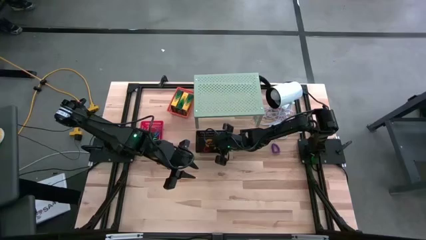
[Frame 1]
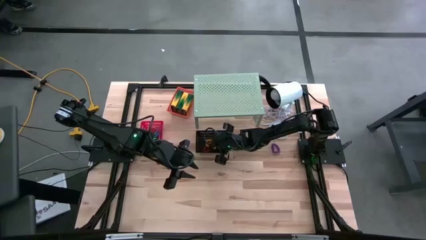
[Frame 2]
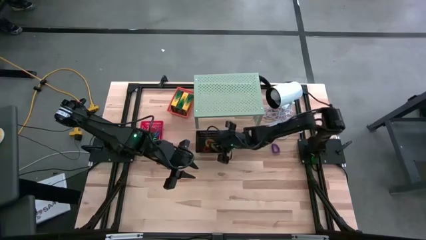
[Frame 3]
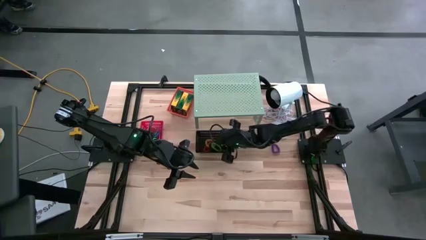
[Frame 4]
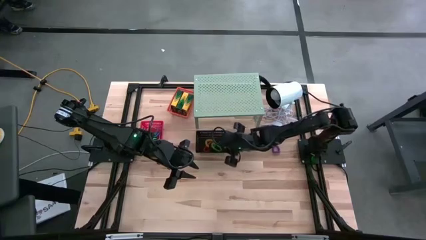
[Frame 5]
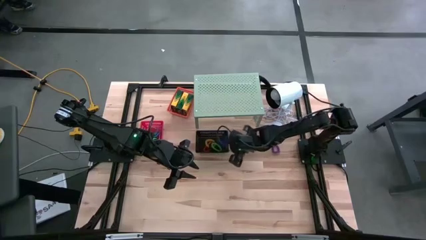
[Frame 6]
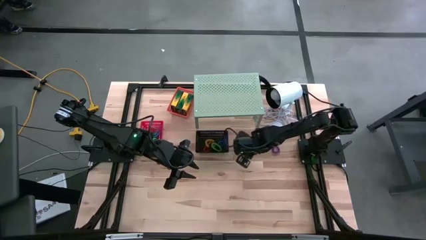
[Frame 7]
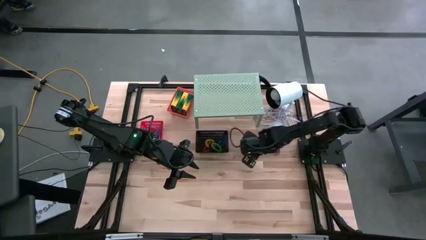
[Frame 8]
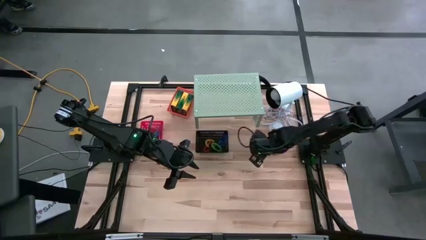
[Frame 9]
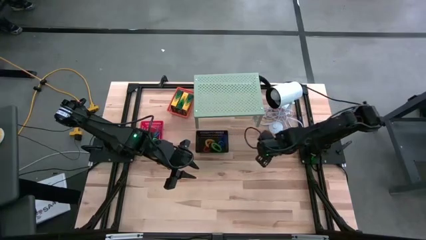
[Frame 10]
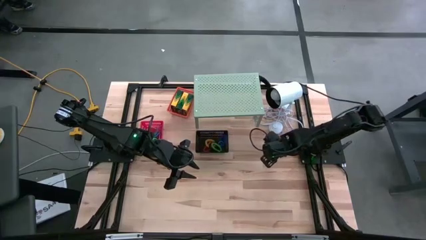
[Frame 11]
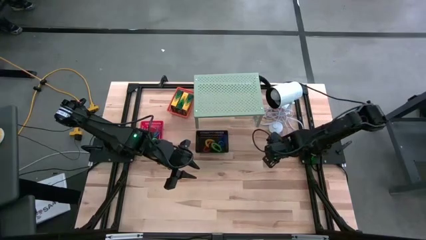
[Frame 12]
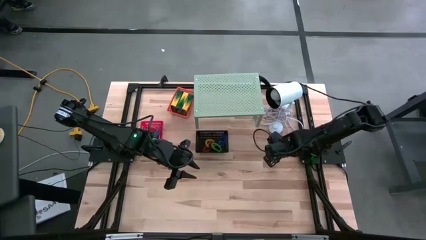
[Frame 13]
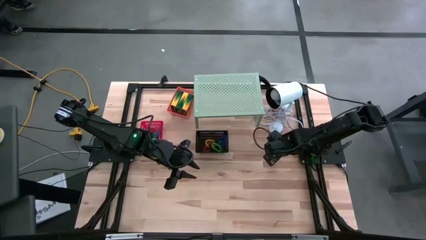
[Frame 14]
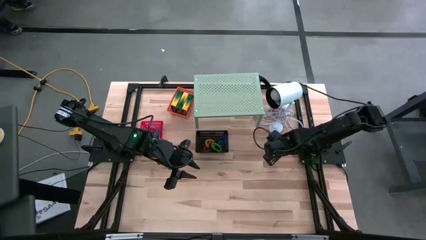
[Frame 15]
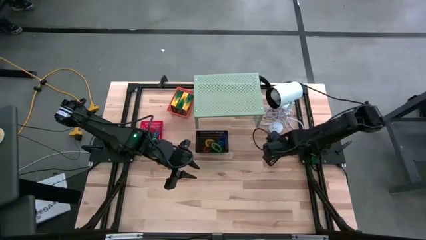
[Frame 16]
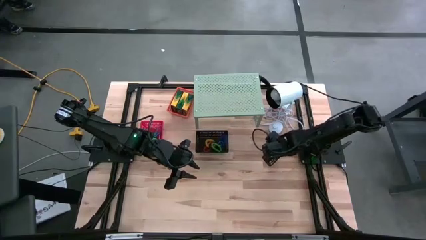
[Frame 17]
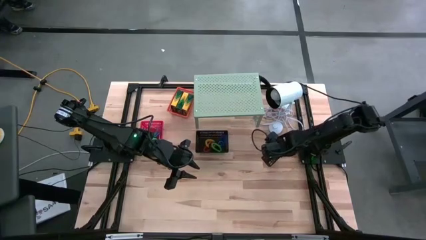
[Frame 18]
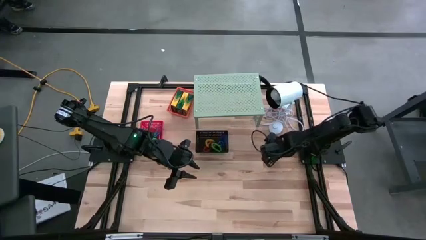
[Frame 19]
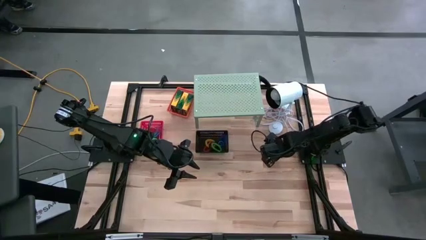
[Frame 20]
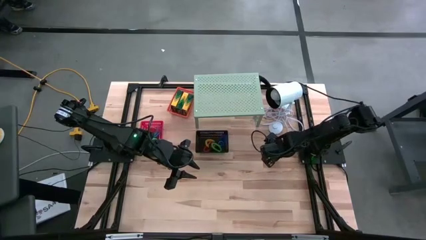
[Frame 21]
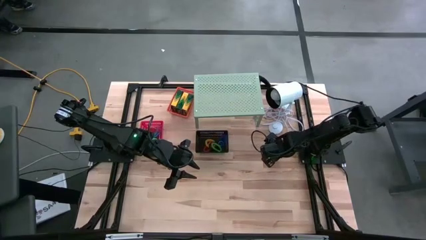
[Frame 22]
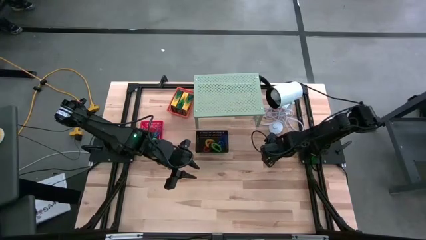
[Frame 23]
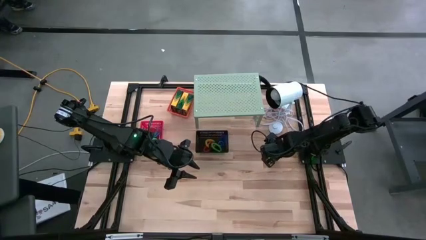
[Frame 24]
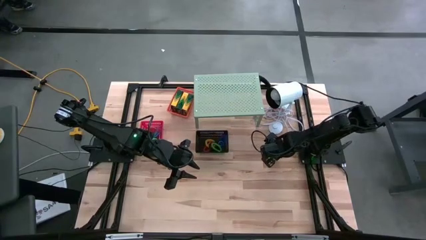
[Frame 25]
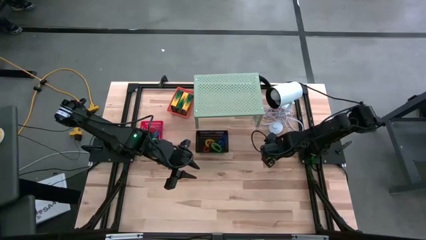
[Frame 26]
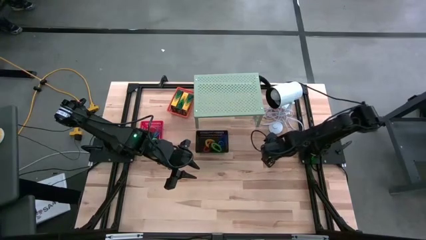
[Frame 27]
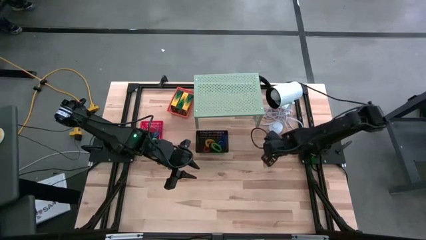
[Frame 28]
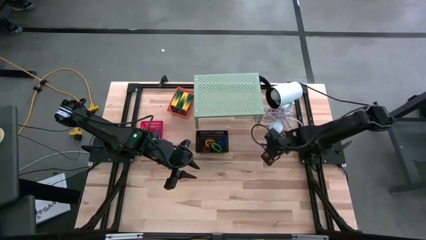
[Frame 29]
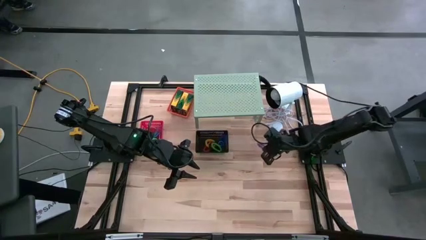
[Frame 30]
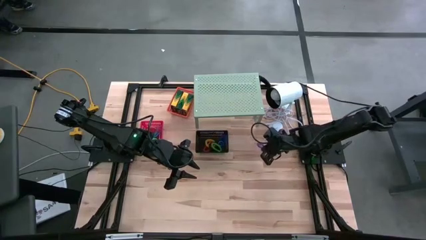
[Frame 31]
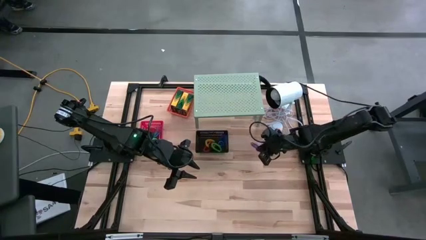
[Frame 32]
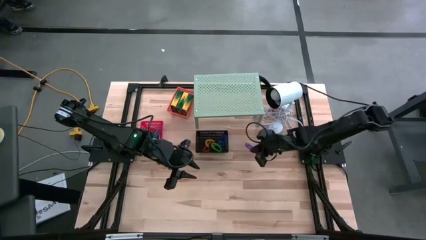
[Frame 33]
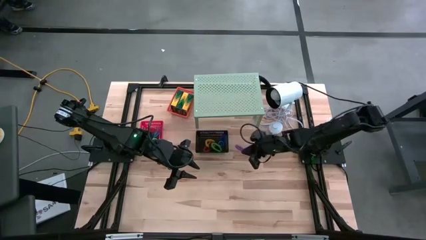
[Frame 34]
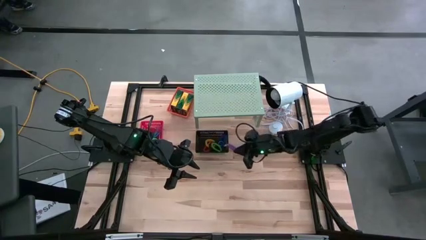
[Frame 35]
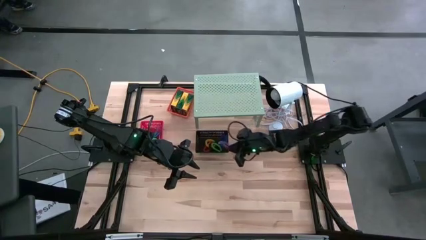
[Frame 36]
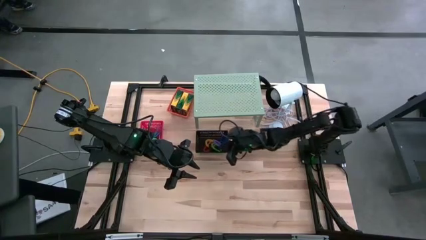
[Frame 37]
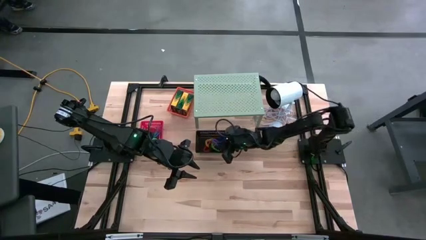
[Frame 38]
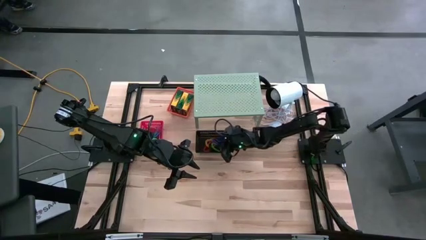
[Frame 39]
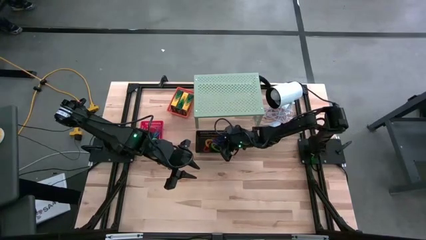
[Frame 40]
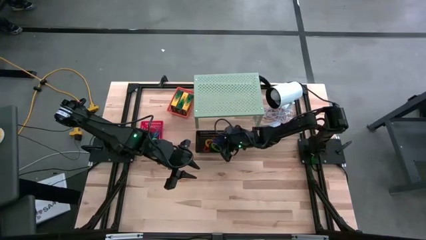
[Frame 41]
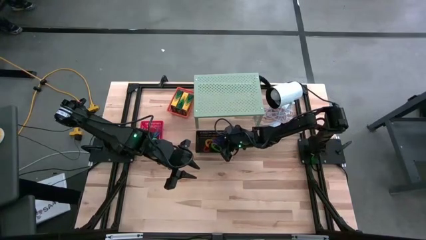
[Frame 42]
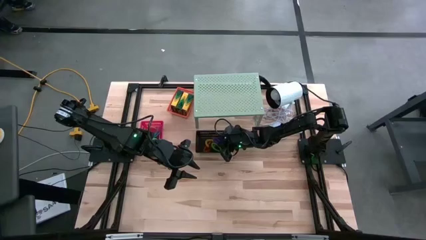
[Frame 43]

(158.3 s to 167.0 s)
Task: Pick & Place Office Desk Supplies
Put the violet spring rubber band into the black bin on the shelf

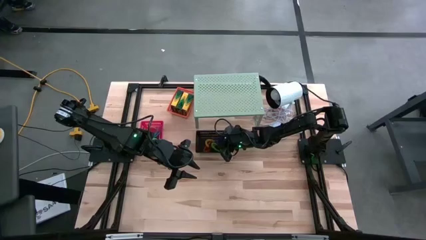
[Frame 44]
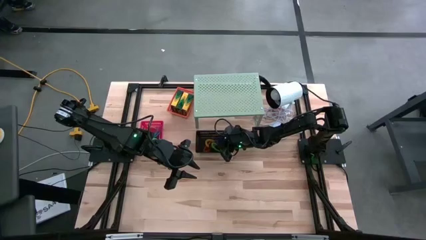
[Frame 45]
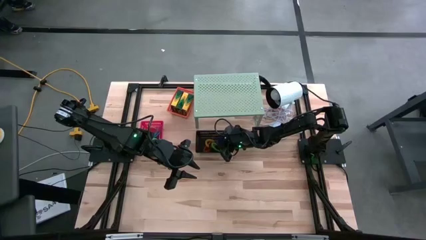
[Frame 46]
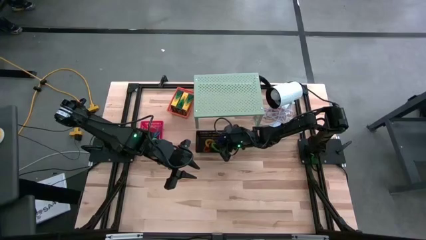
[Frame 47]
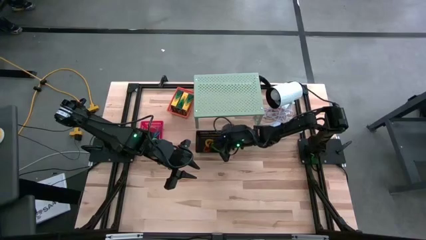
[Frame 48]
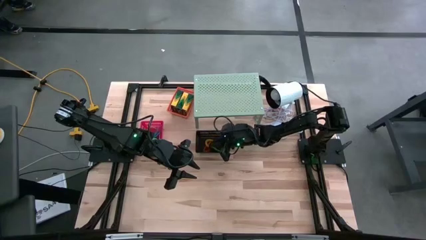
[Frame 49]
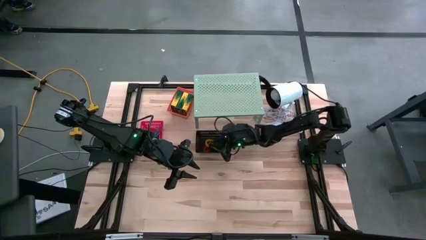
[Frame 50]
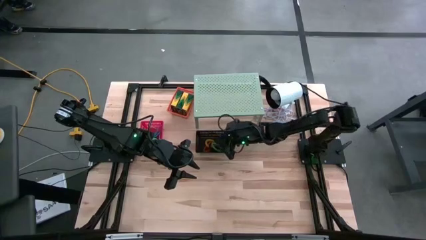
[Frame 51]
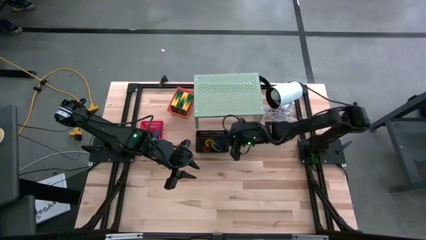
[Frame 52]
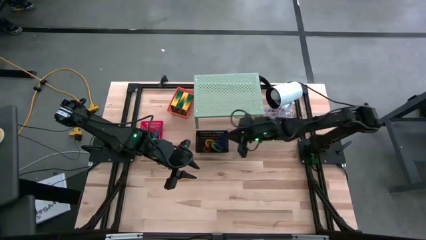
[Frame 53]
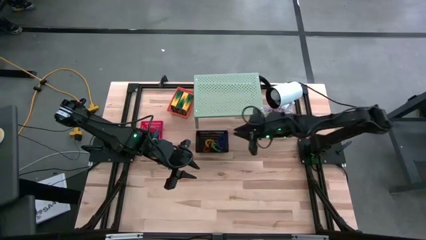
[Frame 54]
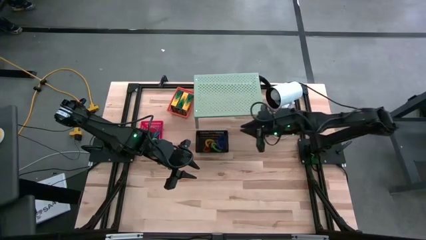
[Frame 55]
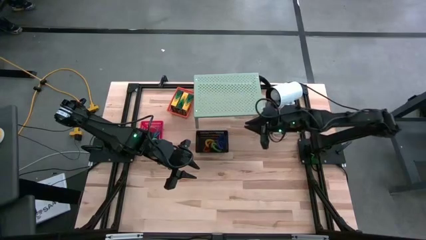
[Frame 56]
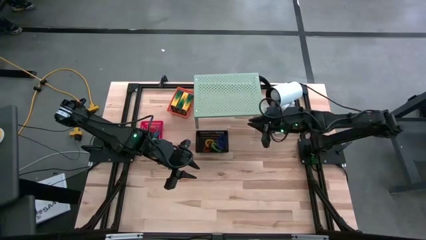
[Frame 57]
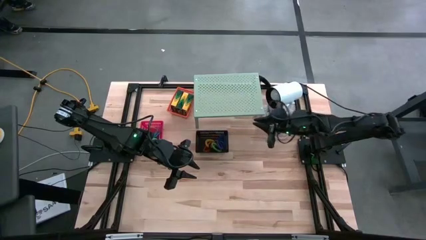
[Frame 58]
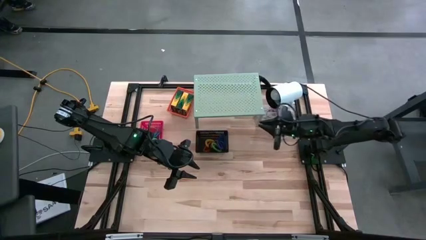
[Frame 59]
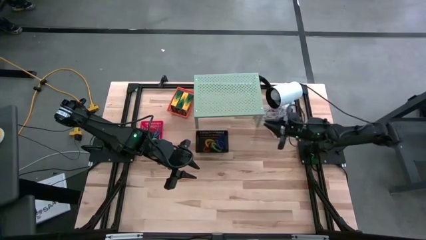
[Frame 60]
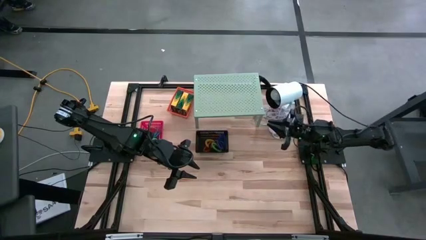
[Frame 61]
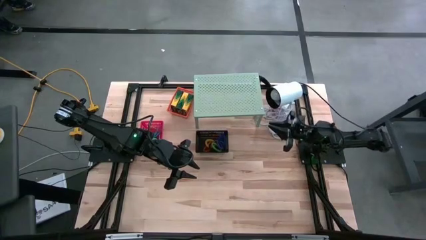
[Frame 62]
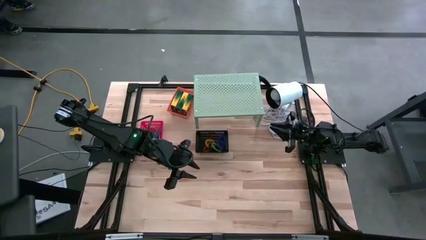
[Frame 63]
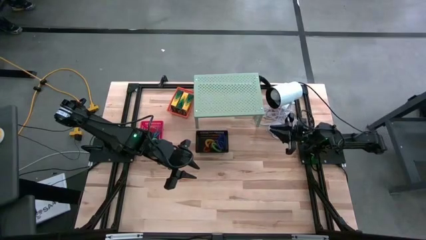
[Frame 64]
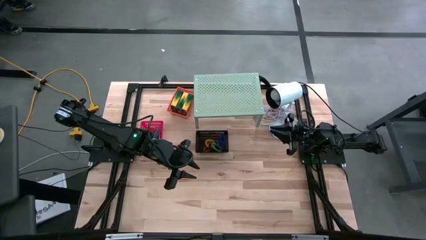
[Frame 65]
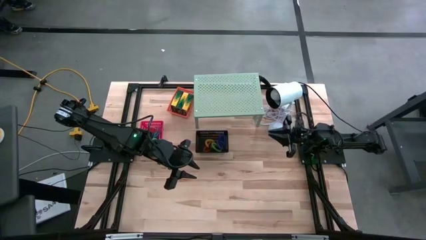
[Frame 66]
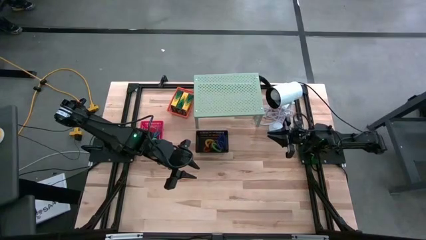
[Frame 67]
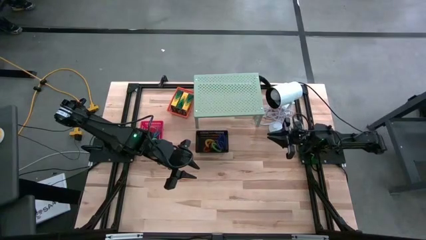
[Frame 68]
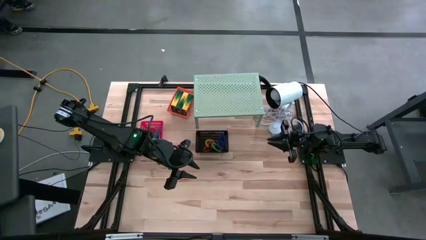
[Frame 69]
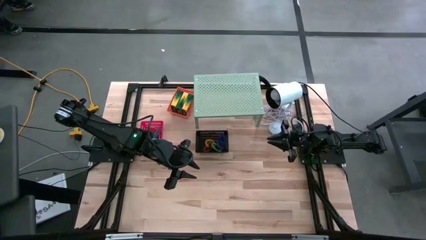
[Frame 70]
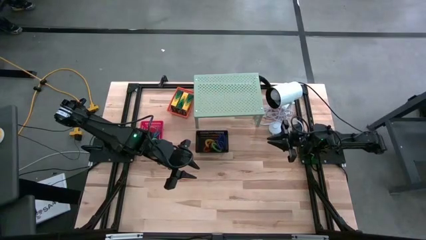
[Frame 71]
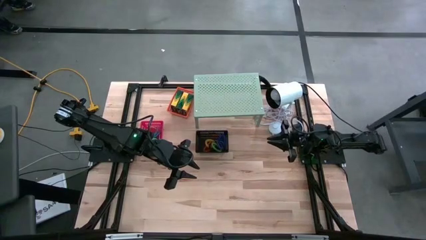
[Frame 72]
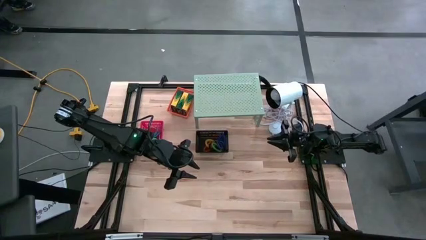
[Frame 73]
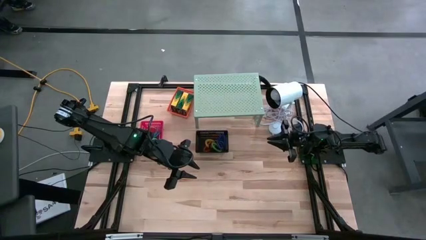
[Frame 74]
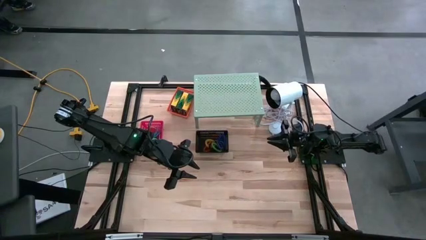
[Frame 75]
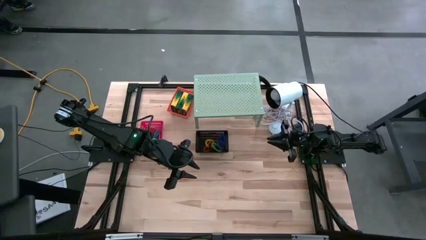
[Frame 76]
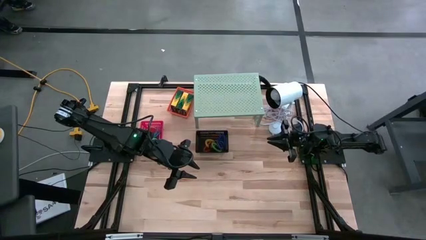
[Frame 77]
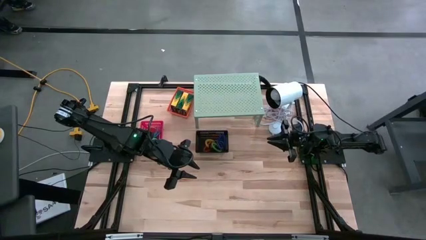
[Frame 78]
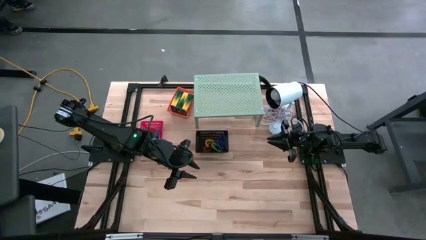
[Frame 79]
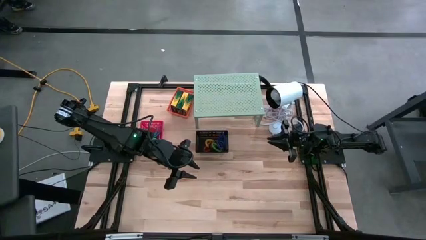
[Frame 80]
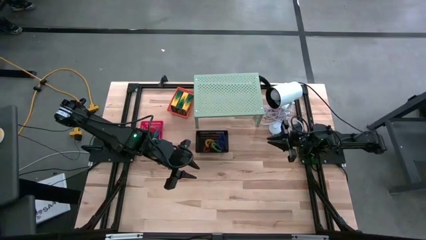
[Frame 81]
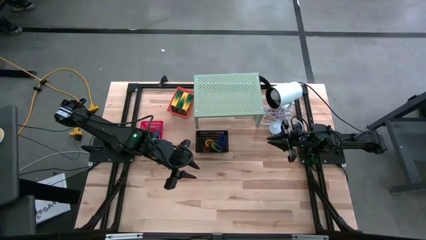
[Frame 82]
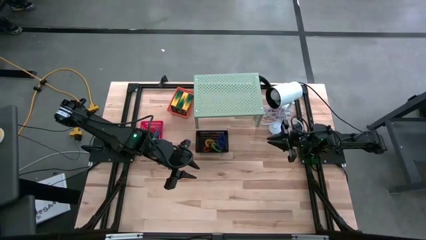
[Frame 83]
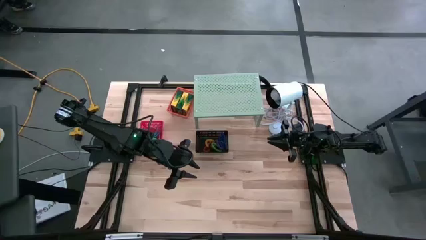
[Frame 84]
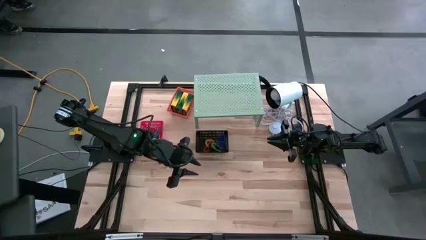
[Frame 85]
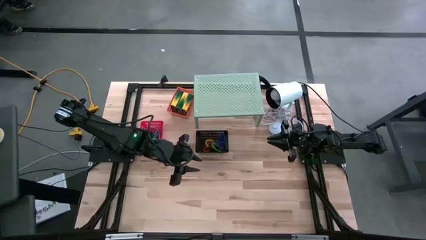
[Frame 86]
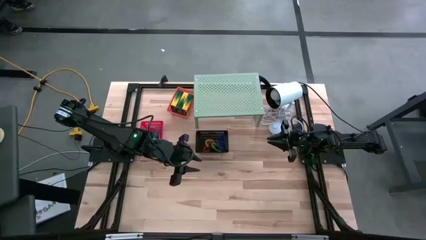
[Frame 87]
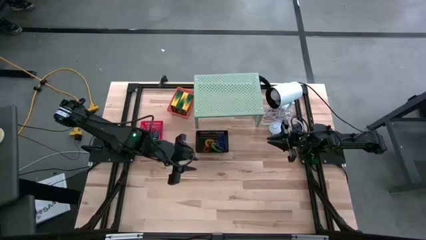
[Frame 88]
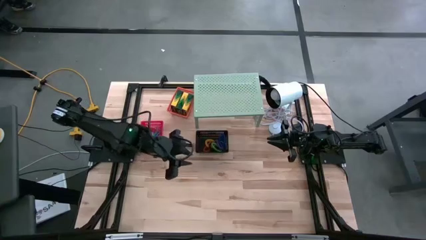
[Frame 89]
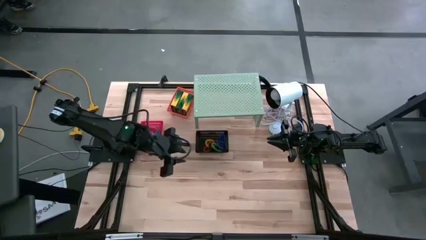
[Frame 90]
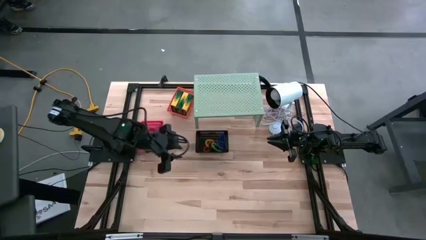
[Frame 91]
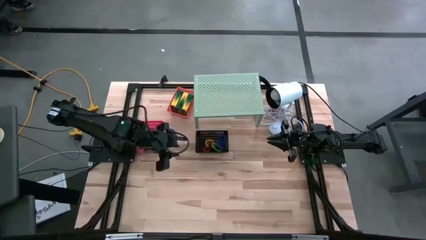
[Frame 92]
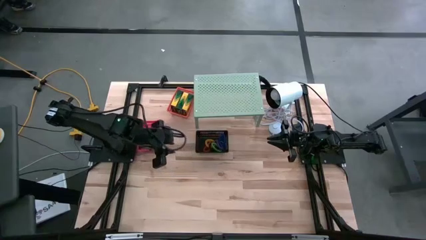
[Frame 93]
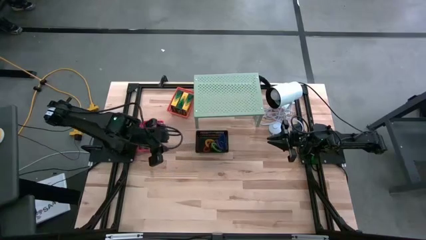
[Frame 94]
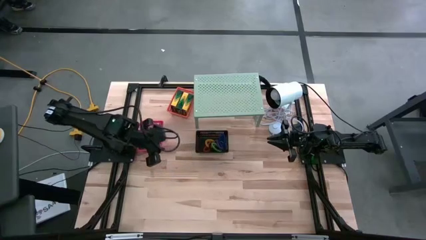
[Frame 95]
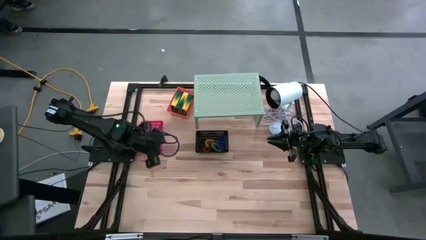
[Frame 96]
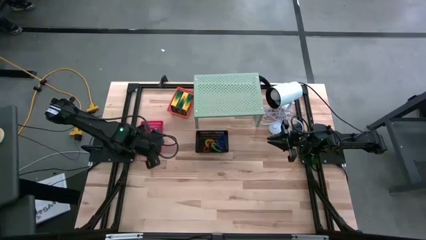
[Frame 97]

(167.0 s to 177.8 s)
Put the red bin with the rubber bands on the shelf
